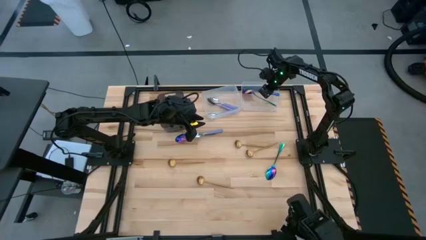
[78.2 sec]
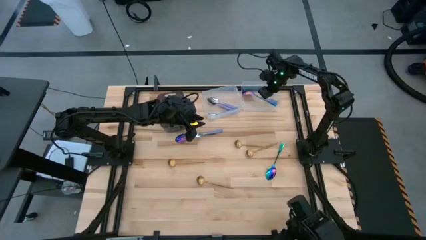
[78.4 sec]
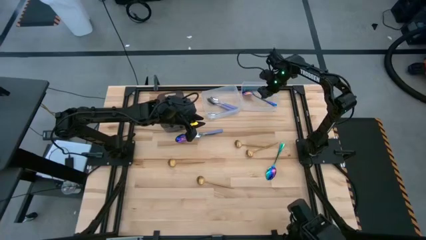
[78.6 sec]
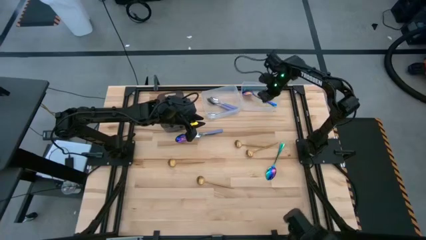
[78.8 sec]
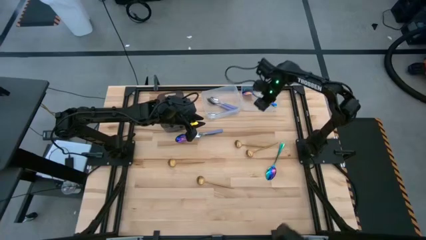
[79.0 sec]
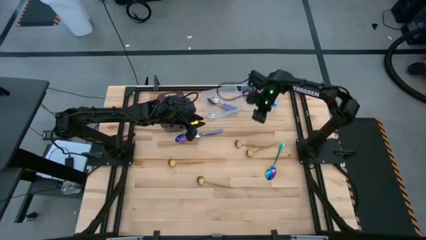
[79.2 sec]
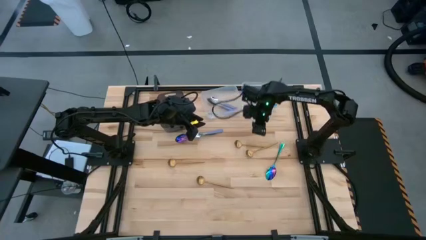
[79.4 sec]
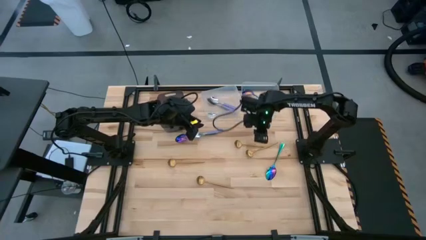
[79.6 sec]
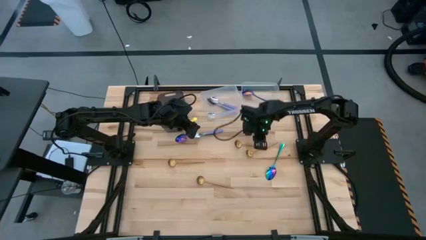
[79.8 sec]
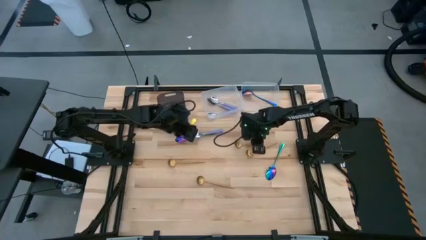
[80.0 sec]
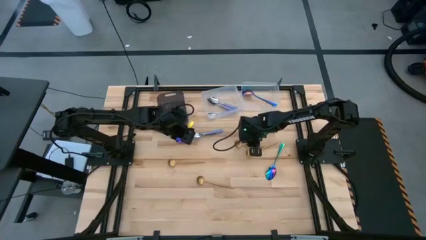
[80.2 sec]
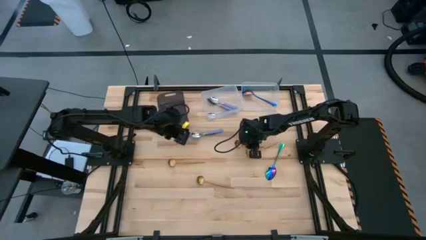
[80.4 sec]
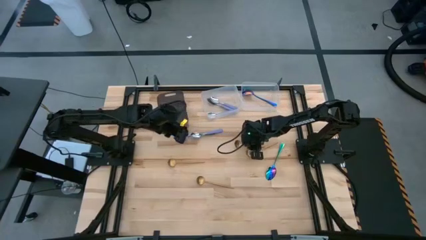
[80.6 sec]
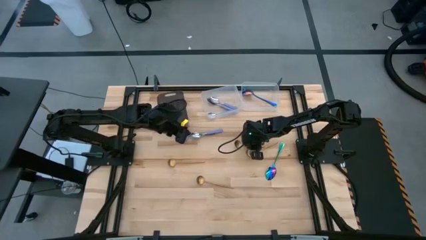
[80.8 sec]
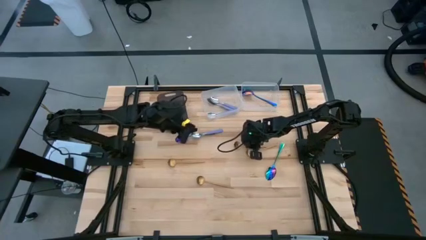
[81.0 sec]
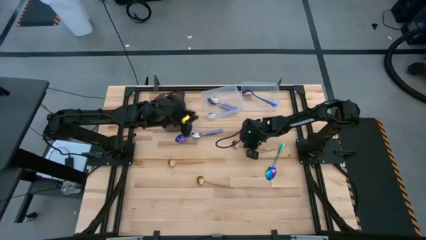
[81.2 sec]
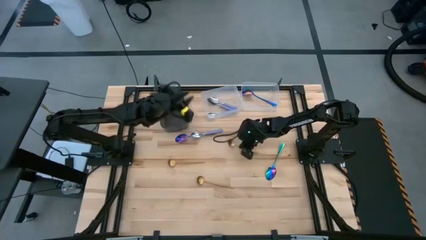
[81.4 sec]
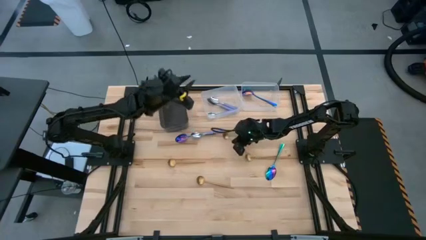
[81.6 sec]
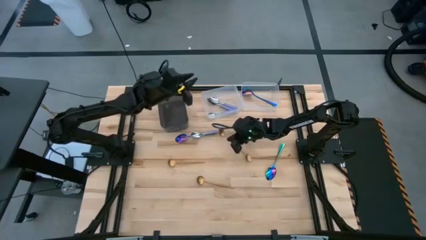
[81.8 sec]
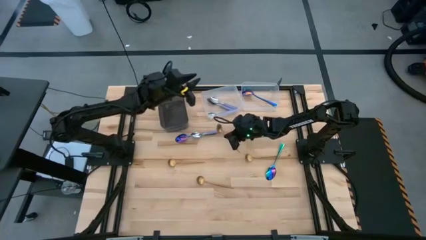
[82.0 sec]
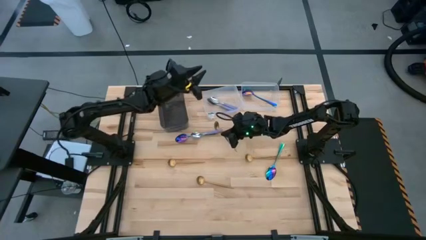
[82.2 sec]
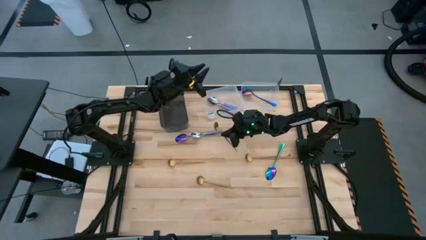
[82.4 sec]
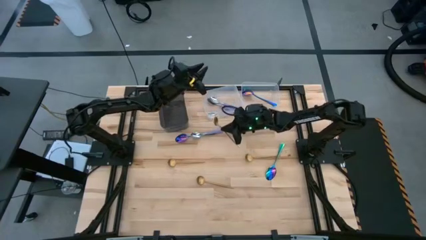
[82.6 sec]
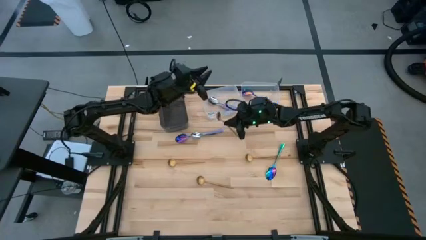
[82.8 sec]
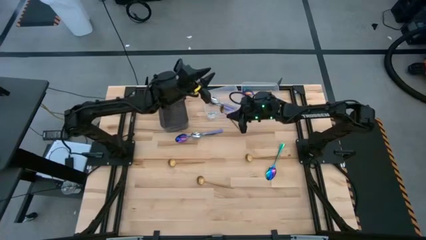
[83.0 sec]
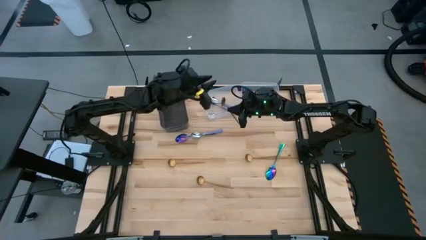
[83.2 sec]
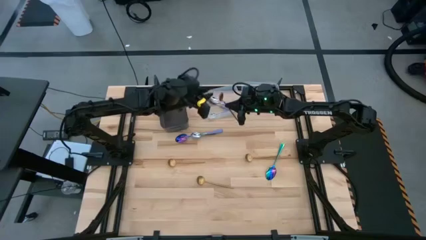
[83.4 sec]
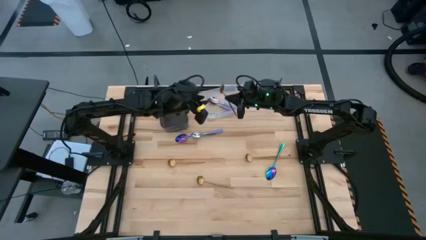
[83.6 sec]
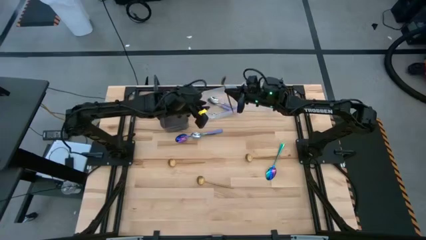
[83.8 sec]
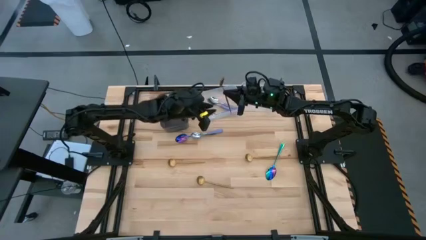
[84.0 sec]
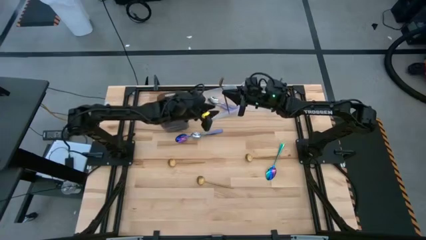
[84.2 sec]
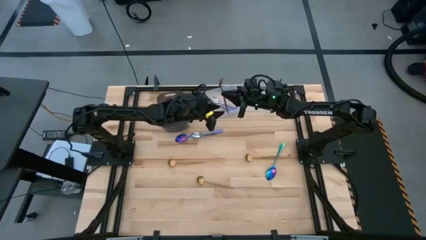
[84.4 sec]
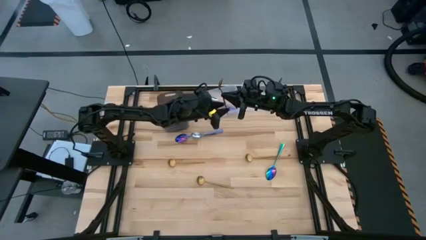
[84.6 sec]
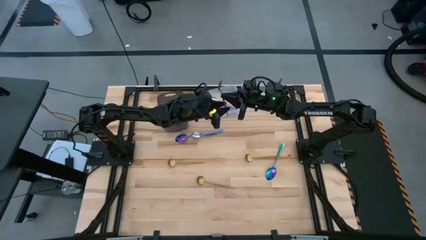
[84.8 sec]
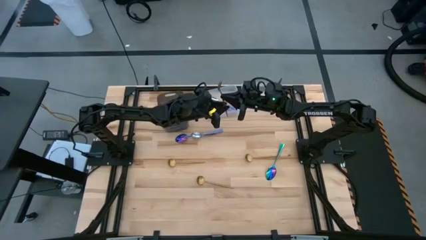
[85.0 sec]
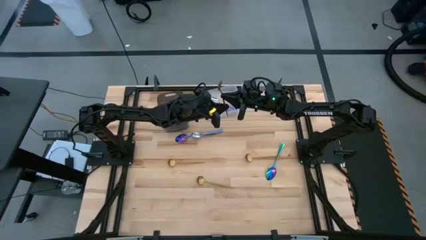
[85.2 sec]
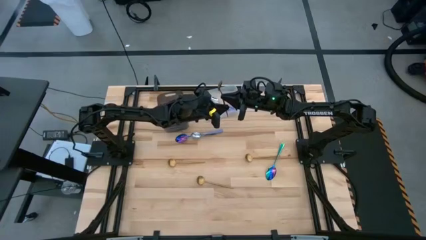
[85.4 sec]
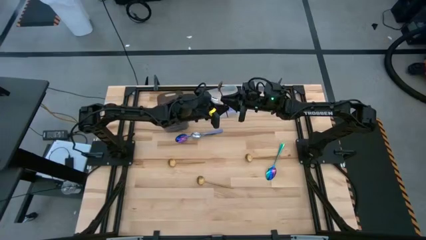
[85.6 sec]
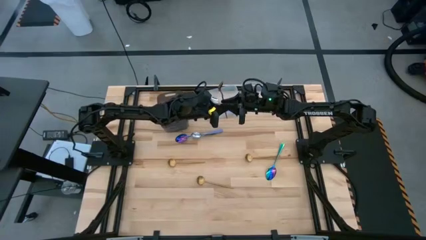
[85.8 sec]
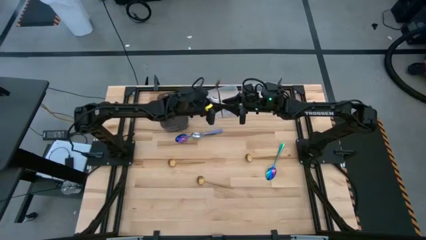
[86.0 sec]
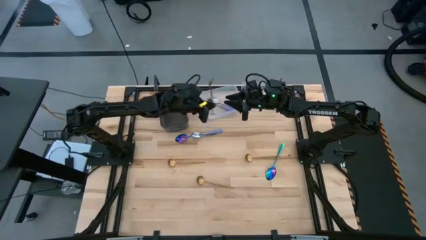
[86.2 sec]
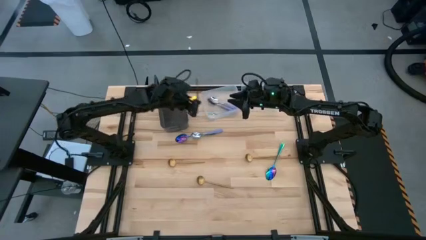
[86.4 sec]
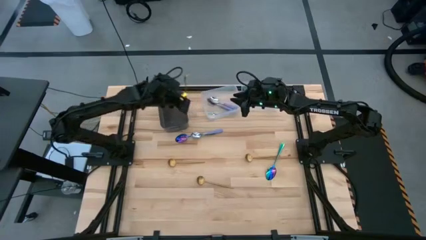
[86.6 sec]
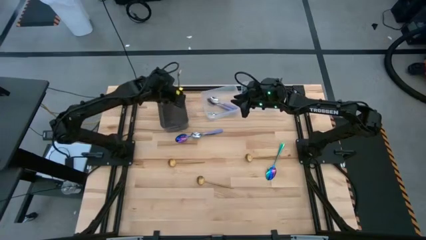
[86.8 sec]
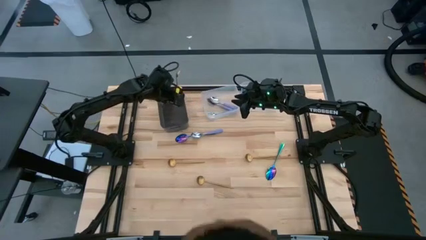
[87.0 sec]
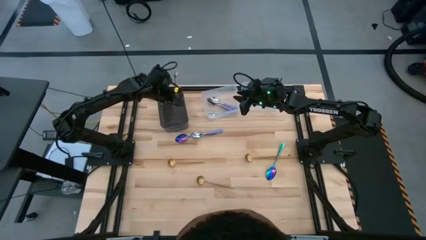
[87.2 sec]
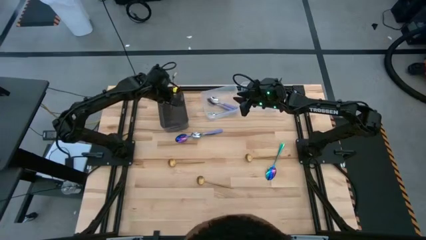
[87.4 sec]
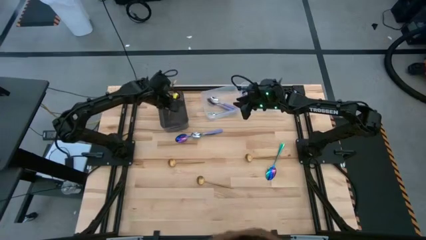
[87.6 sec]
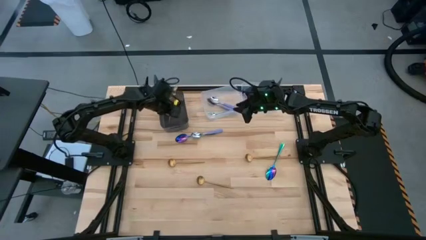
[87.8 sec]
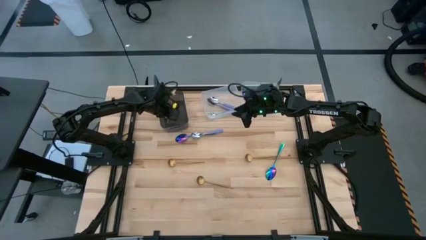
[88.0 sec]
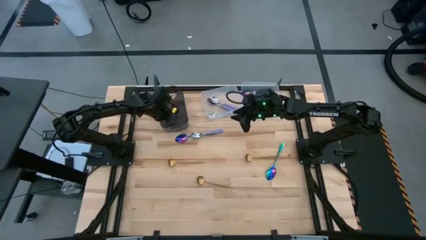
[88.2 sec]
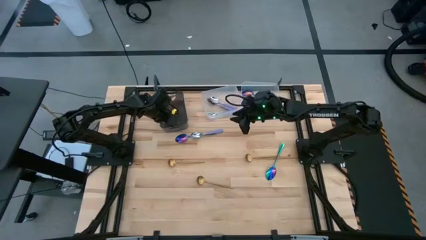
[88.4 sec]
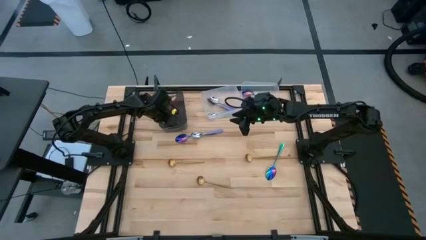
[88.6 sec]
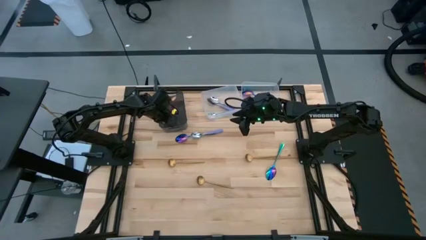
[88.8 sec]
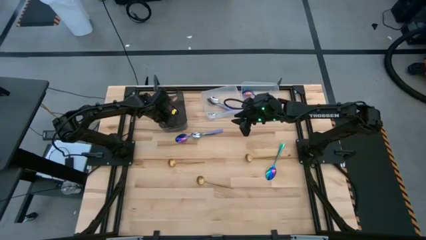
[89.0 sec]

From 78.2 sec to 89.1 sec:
Task: Sort silverware by color (type)
Put the gold spoon into the black bin
